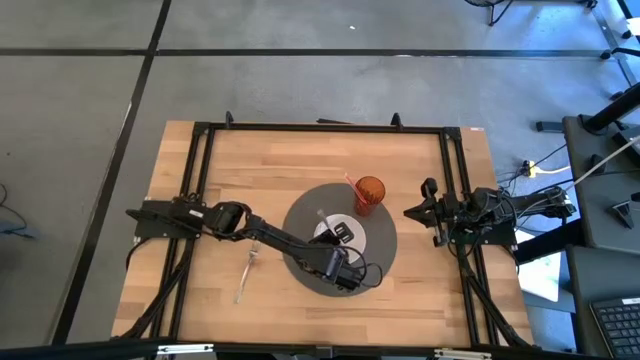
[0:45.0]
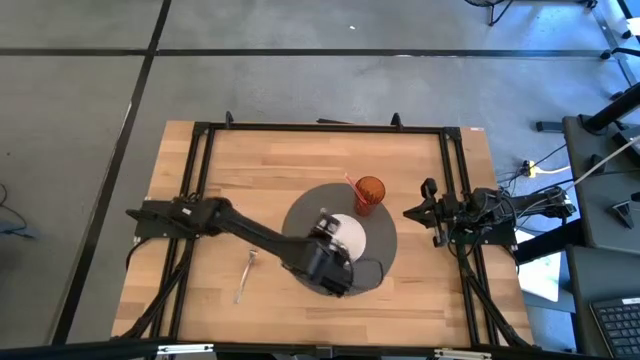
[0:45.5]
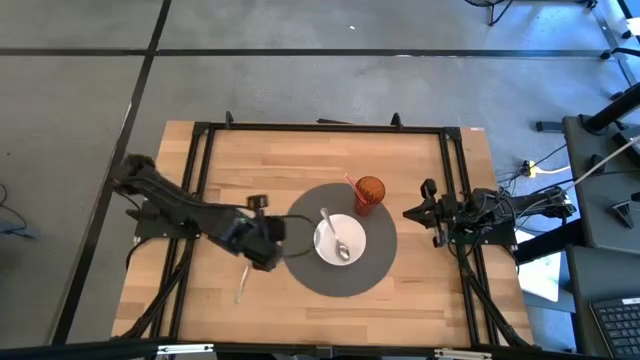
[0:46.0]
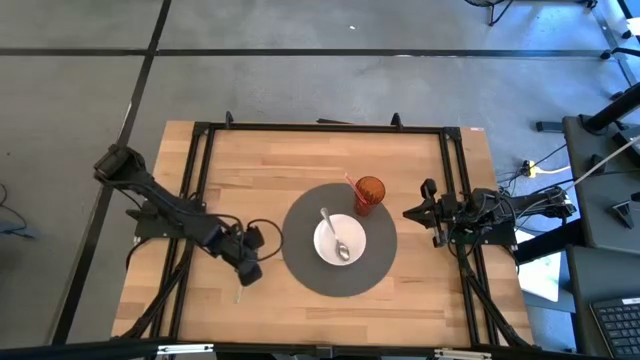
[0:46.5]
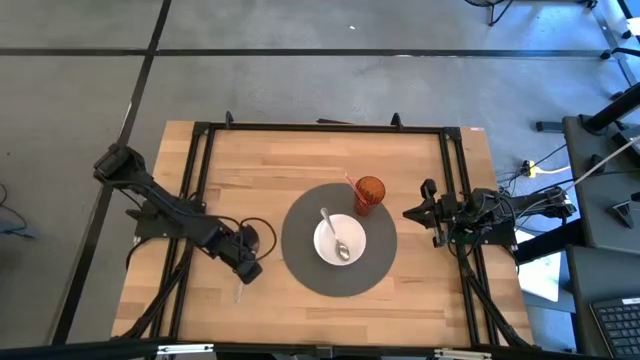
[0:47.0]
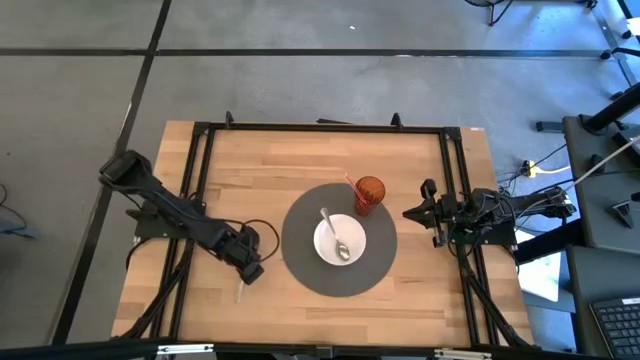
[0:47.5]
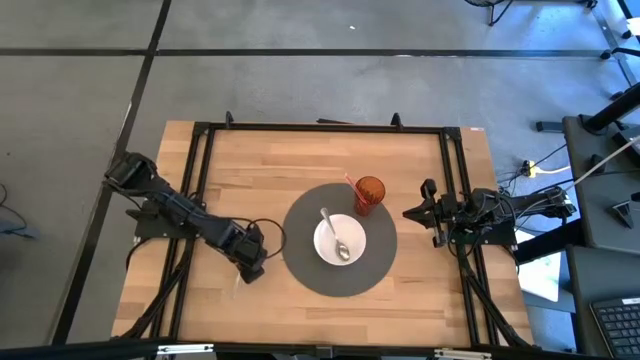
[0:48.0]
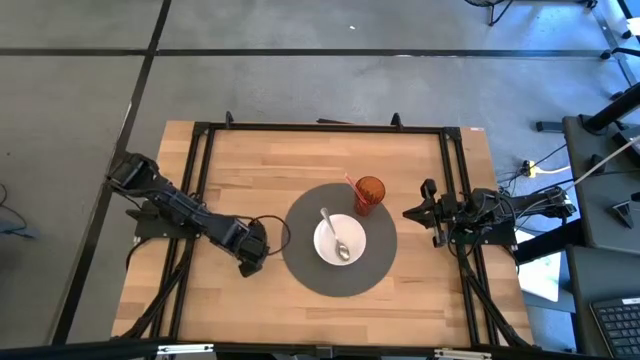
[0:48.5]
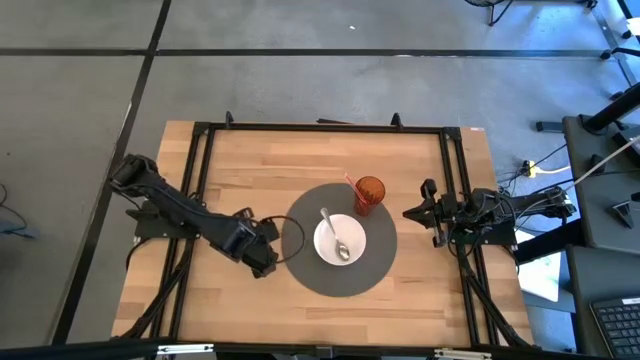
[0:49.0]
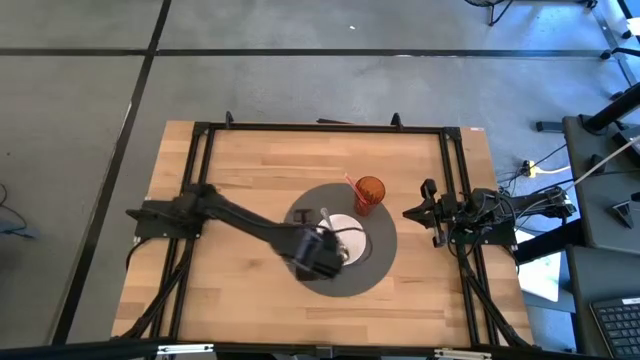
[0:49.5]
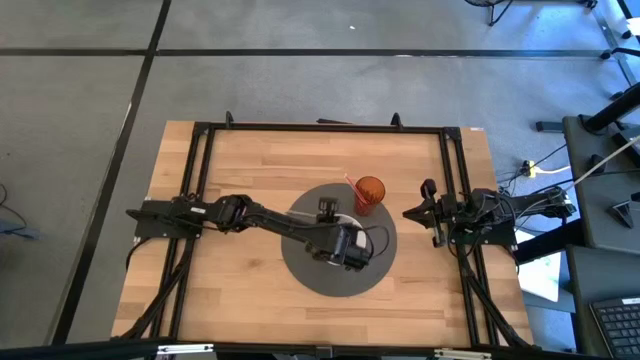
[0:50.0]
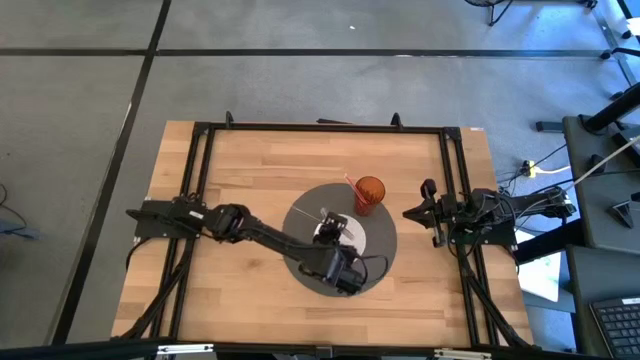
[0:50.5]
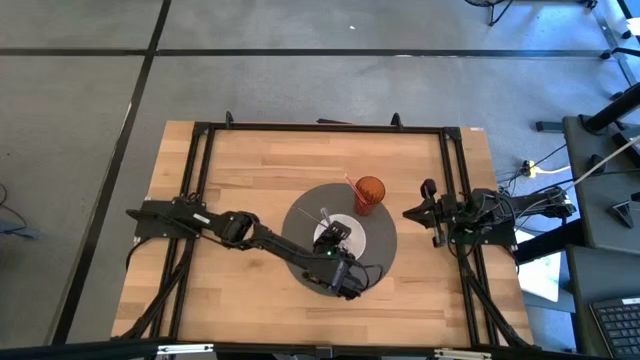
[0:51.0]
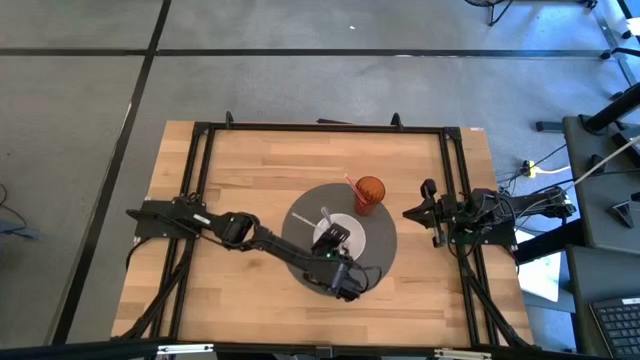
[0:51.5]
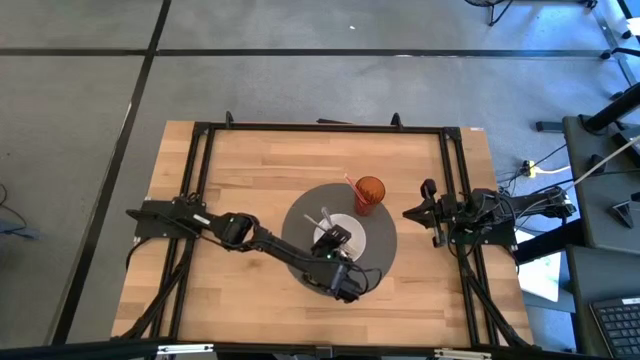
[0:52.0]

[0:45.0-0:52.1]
Task: Pick & Place Utensil
Put the silver fork into the white bowl

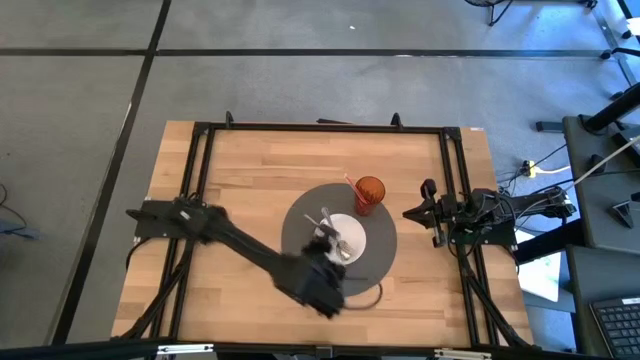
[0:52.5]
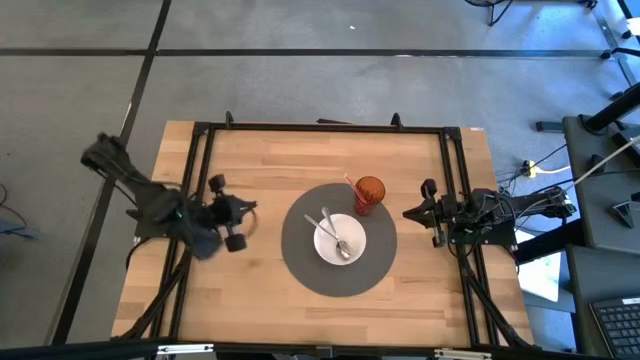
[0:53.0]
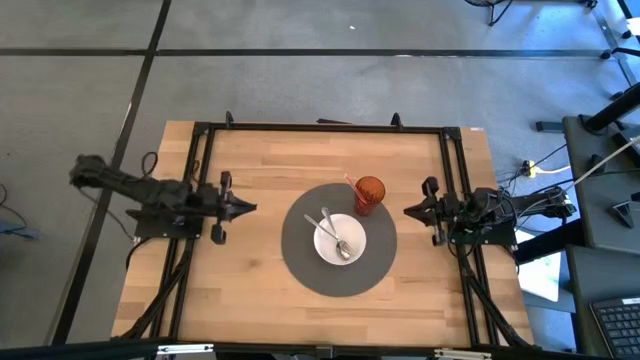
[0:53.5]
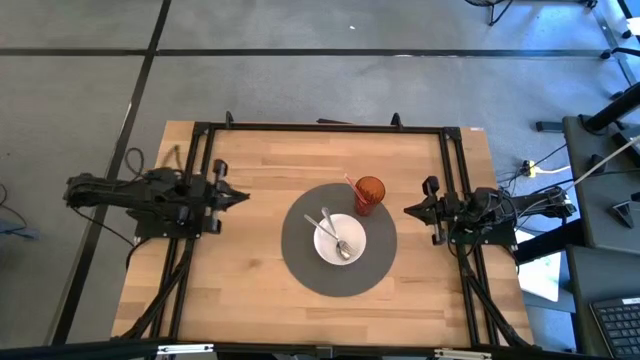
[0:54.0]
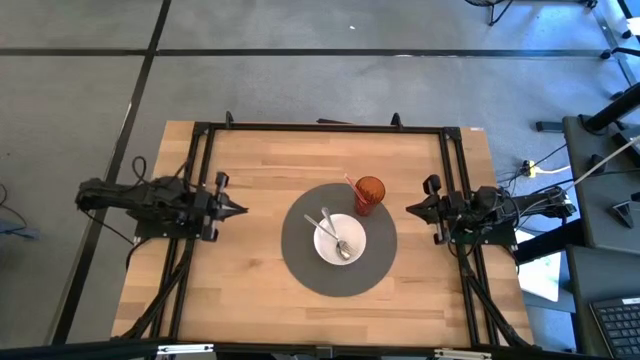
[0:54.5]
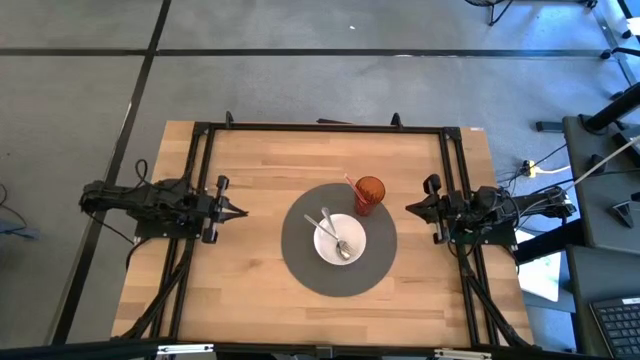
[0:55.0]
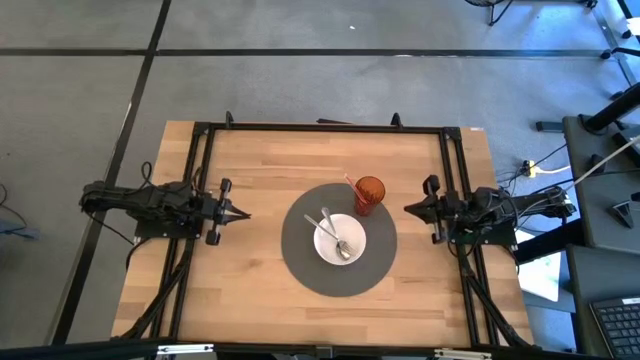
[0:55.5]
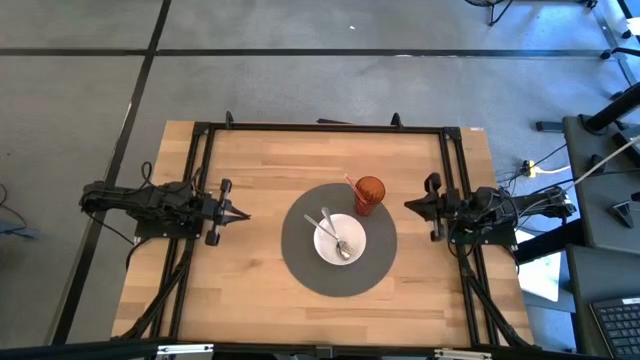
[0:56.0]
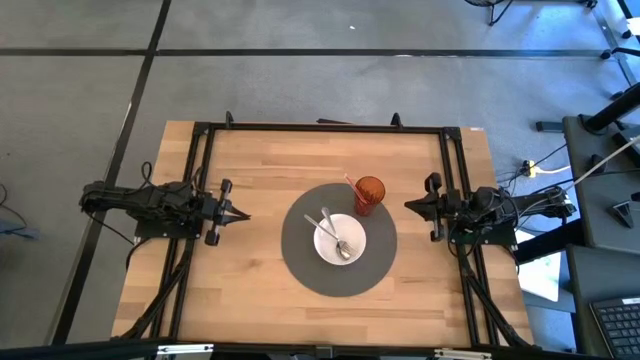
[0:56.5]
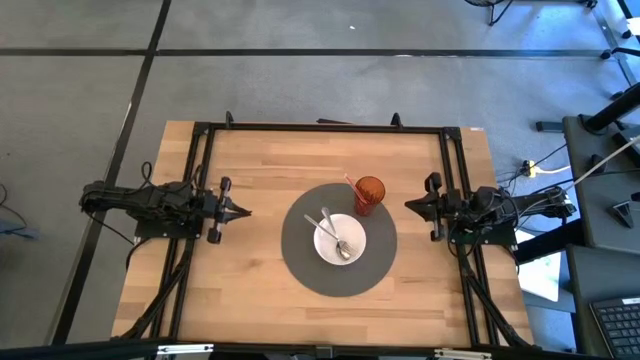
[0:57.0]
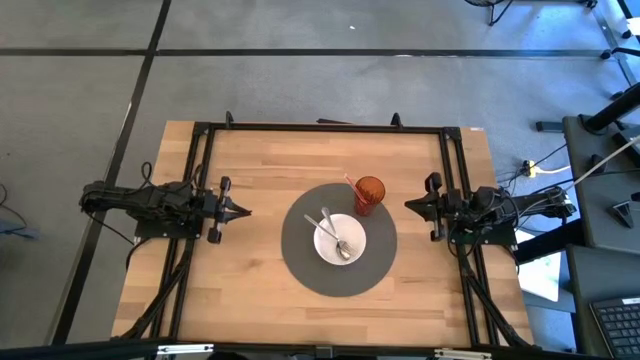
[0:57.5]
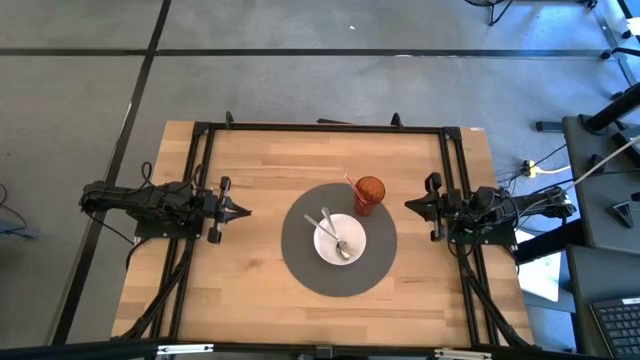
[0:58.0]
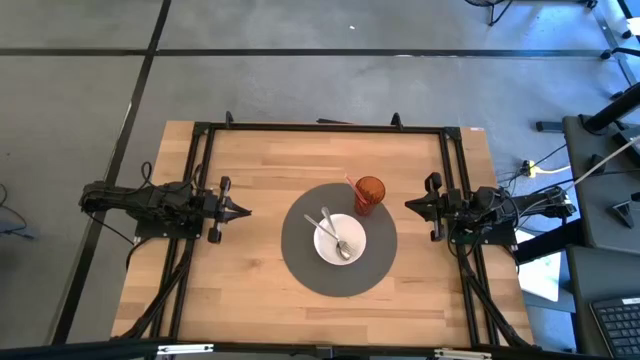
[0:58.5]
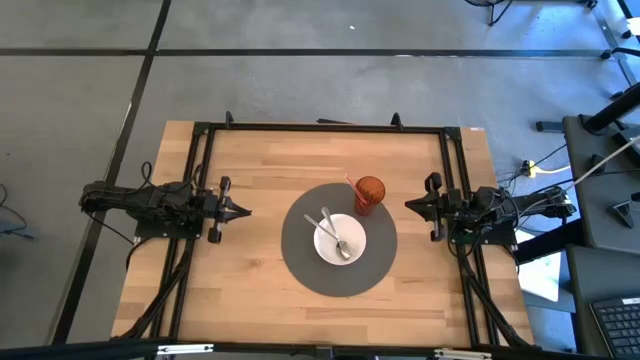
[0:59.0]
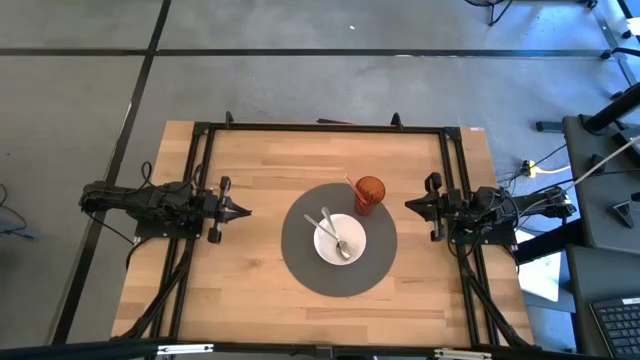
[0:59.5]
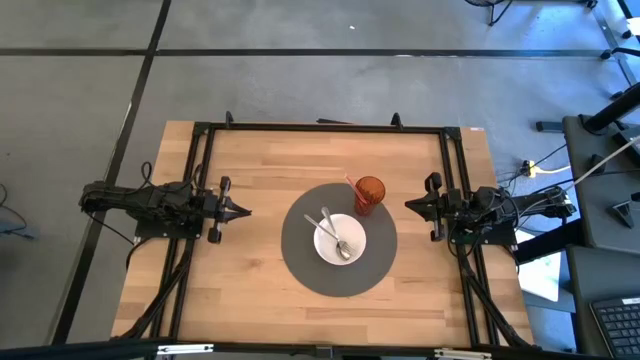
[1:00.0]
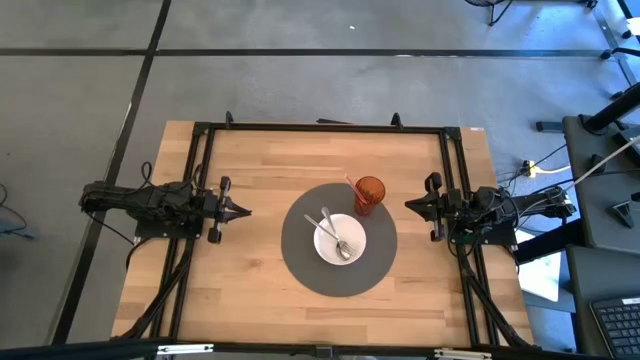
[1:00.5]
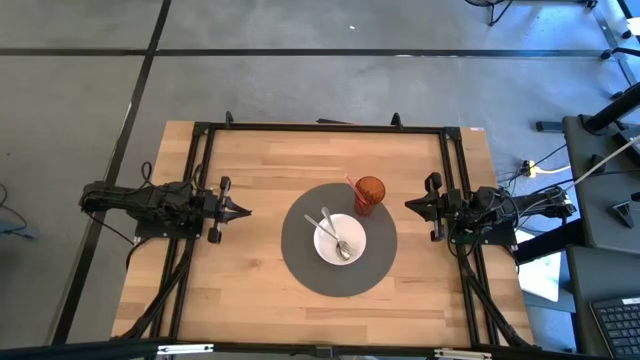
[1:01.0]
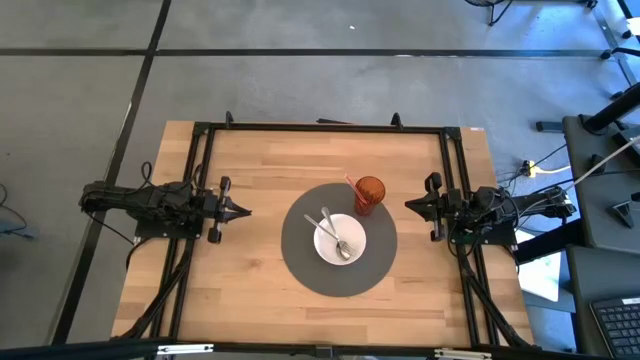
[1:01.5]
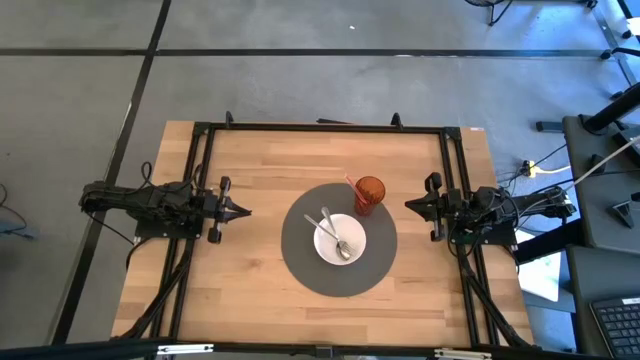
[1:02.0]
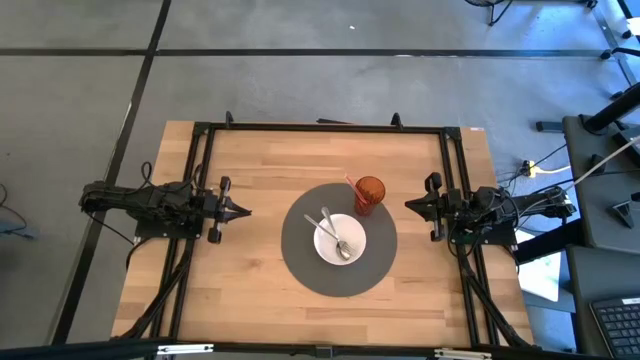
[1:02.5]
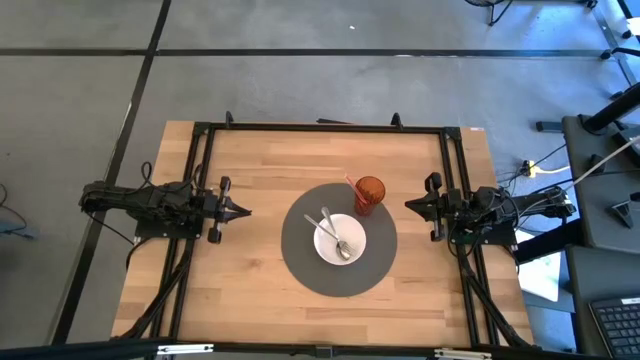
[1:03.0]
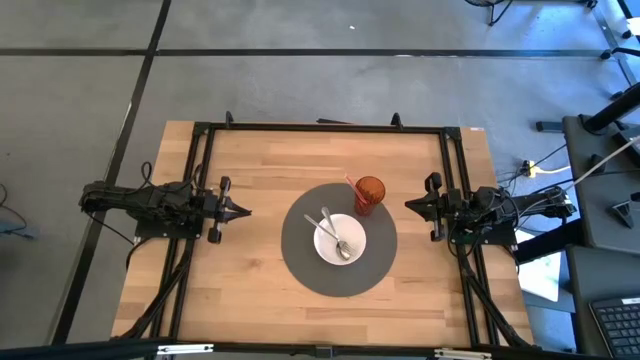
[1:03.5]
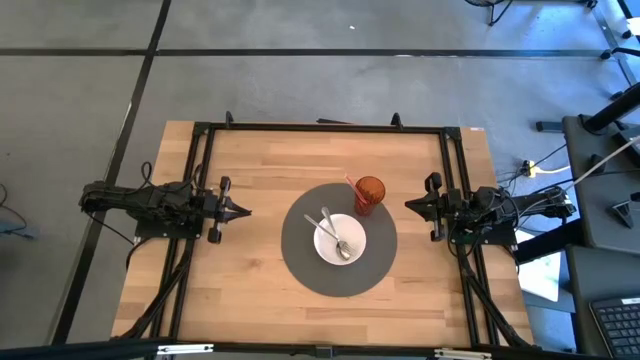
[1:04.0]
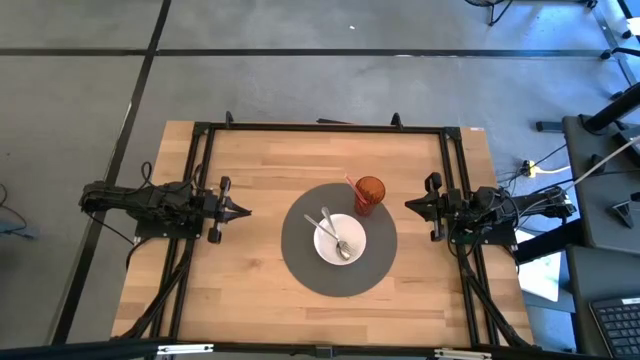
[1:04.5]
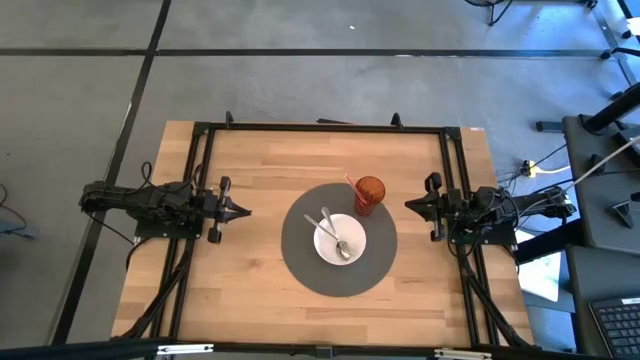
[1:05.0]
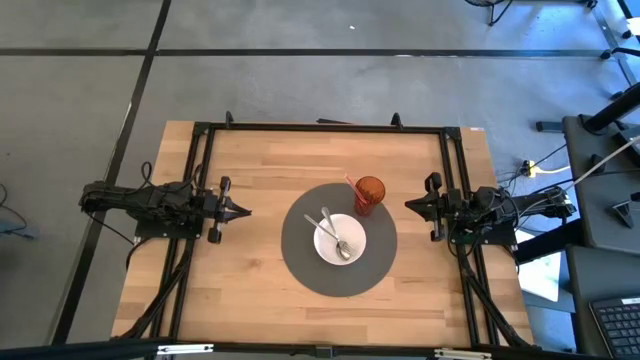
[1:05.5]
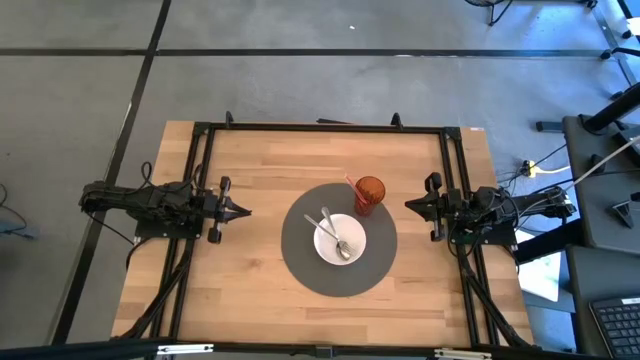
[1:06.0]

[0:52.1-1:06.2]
Return to Home Position
